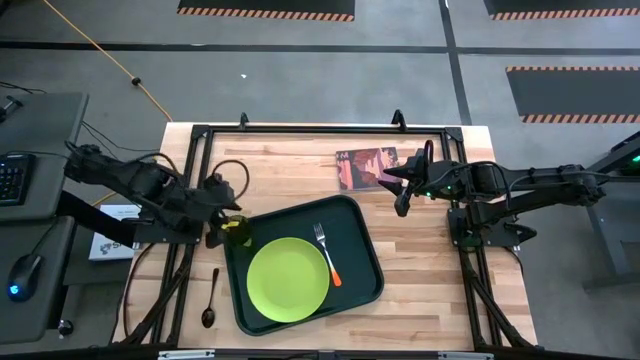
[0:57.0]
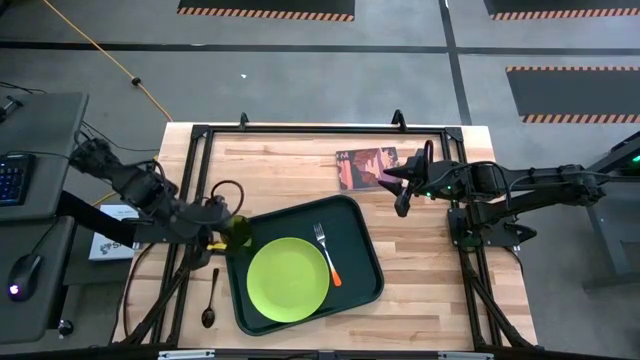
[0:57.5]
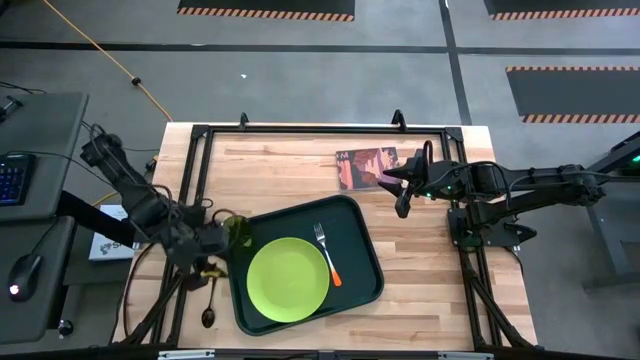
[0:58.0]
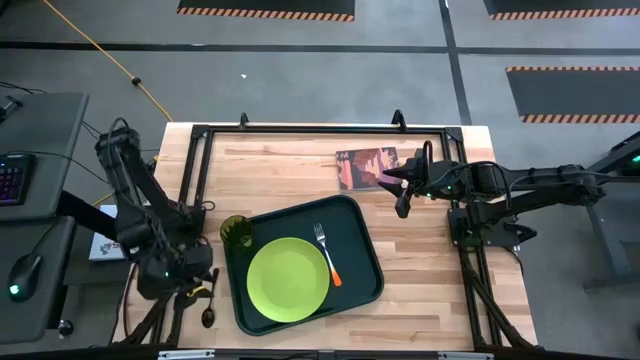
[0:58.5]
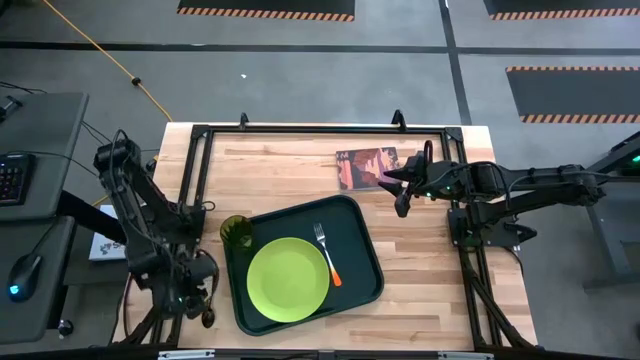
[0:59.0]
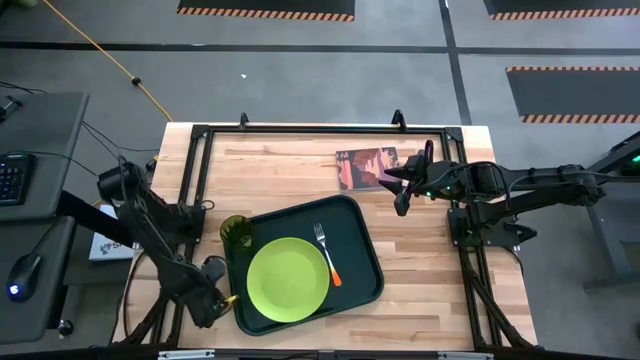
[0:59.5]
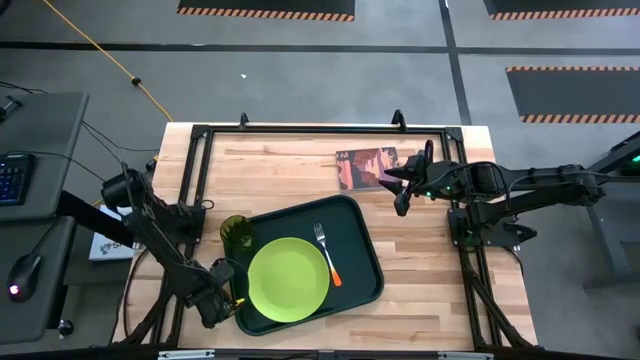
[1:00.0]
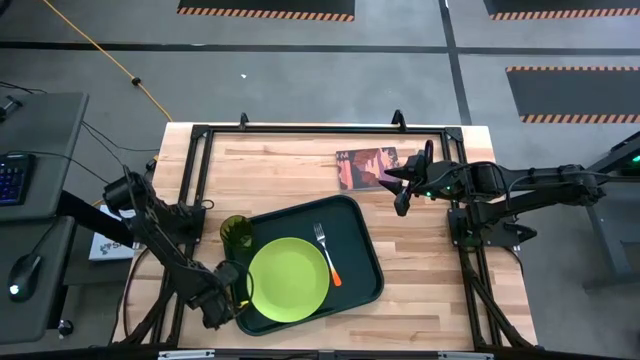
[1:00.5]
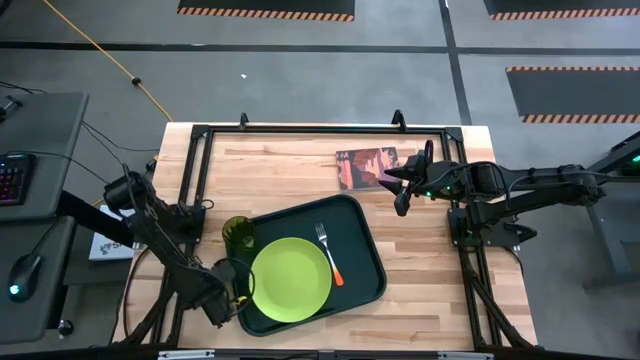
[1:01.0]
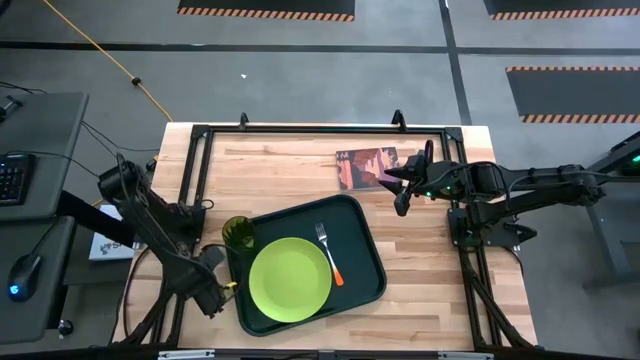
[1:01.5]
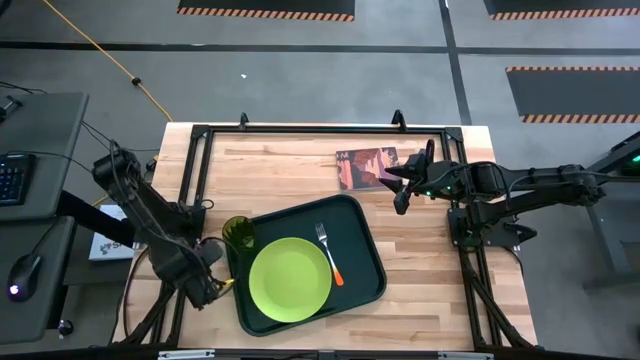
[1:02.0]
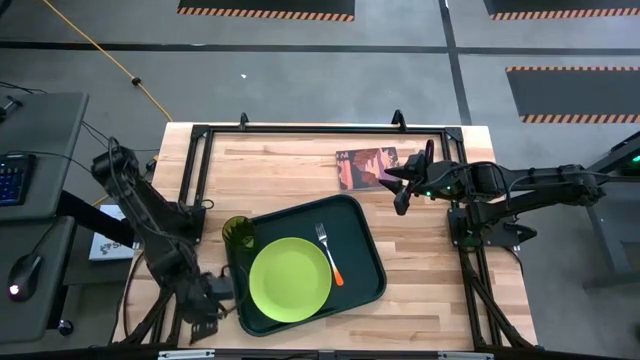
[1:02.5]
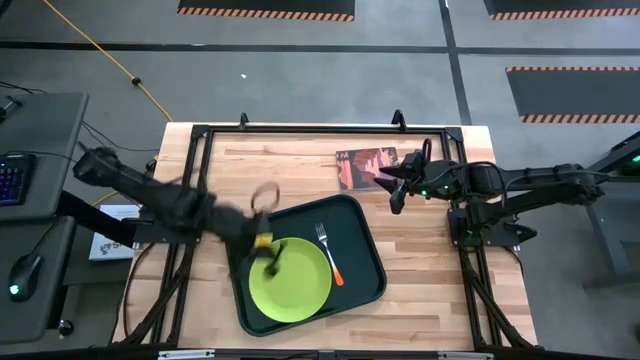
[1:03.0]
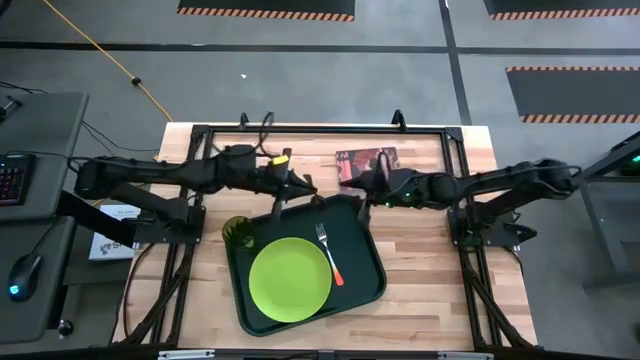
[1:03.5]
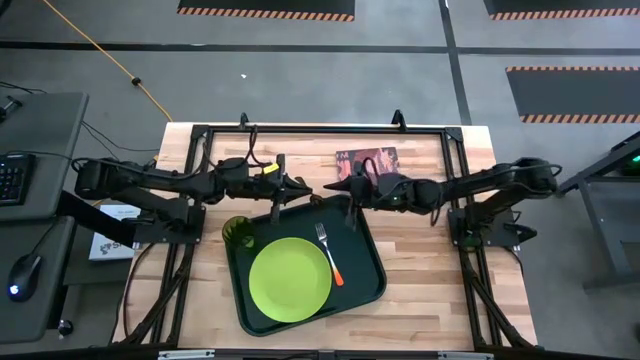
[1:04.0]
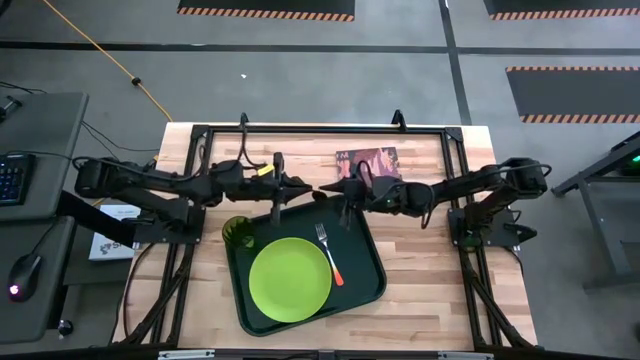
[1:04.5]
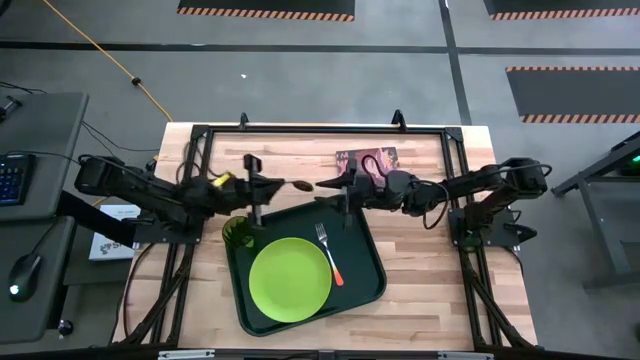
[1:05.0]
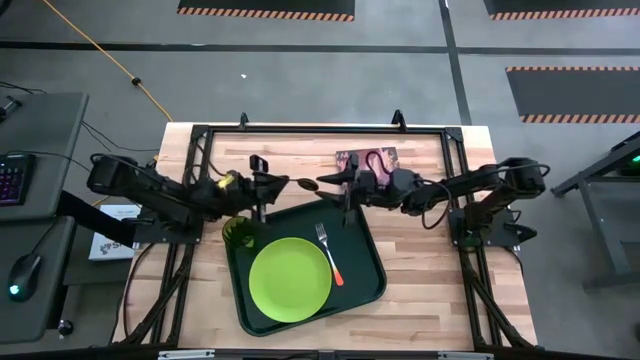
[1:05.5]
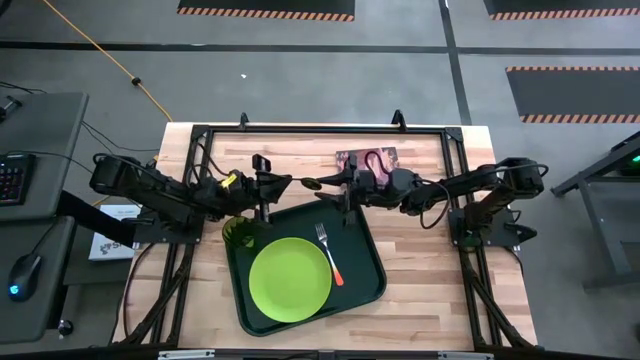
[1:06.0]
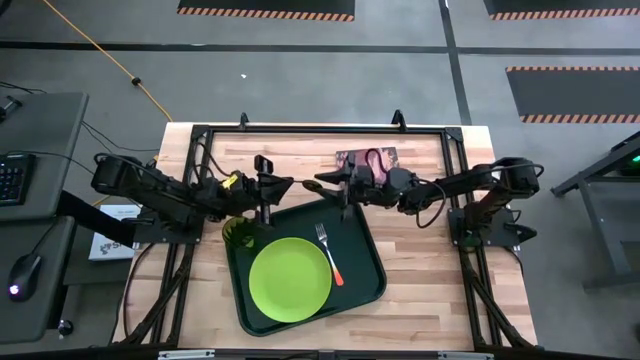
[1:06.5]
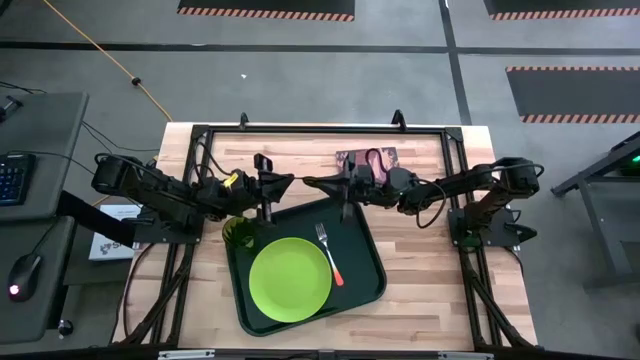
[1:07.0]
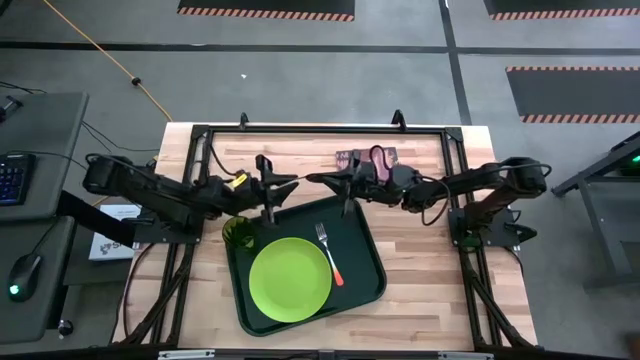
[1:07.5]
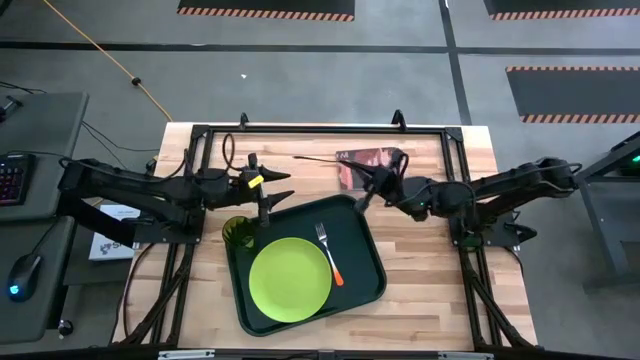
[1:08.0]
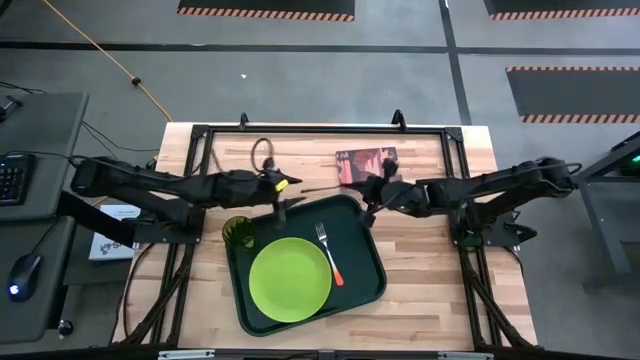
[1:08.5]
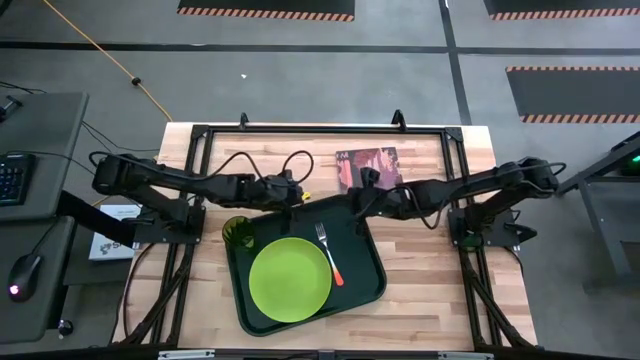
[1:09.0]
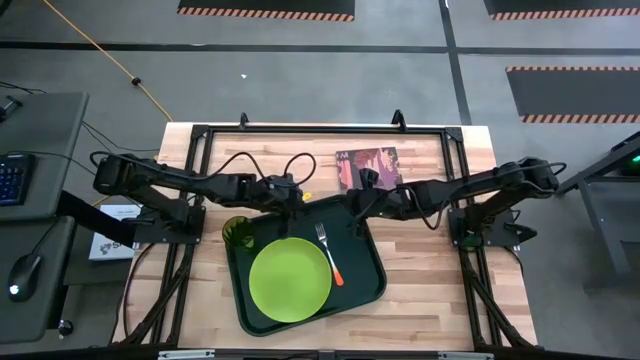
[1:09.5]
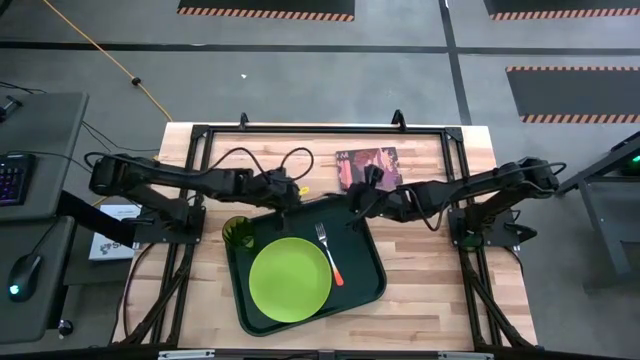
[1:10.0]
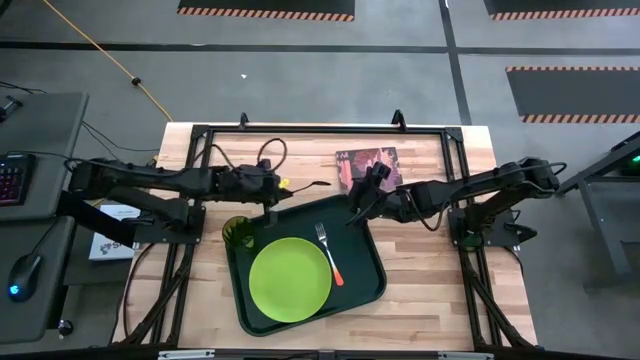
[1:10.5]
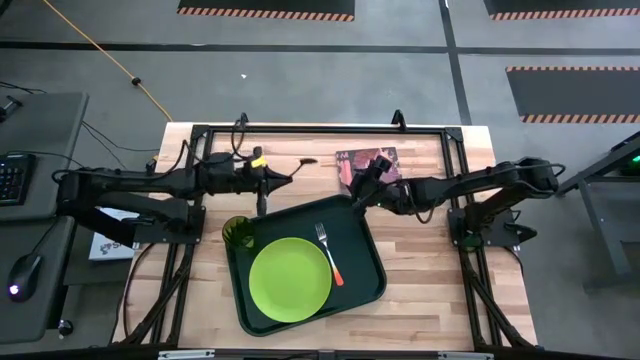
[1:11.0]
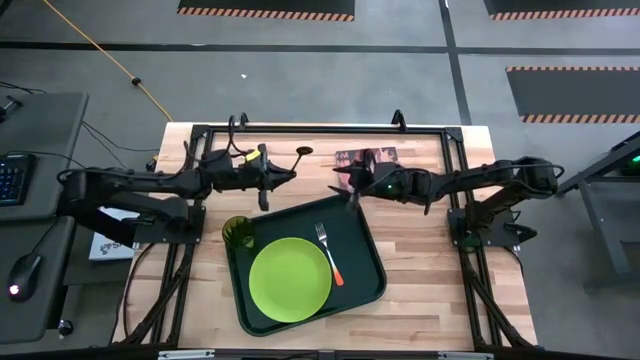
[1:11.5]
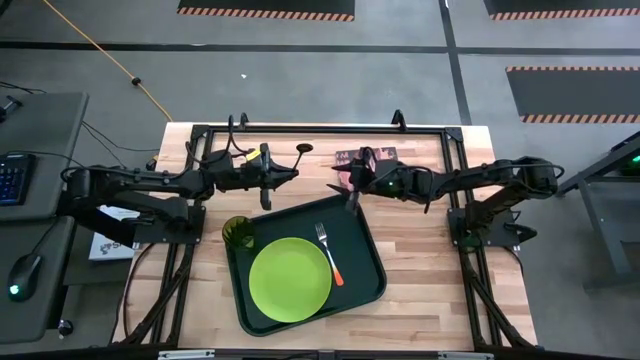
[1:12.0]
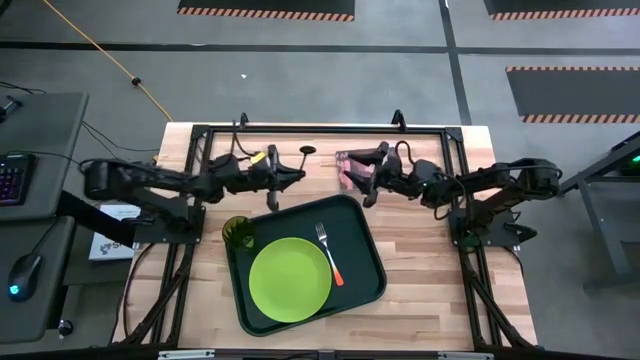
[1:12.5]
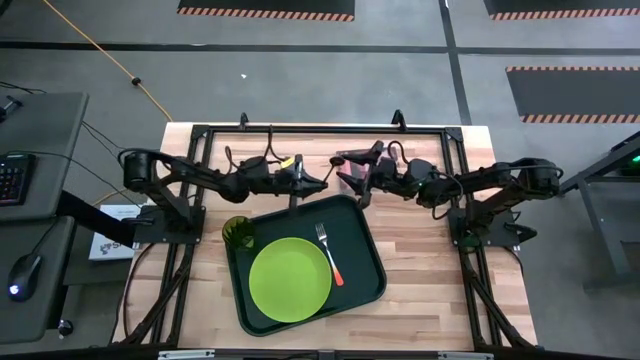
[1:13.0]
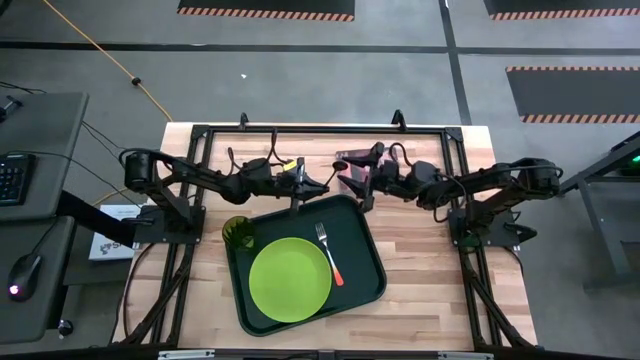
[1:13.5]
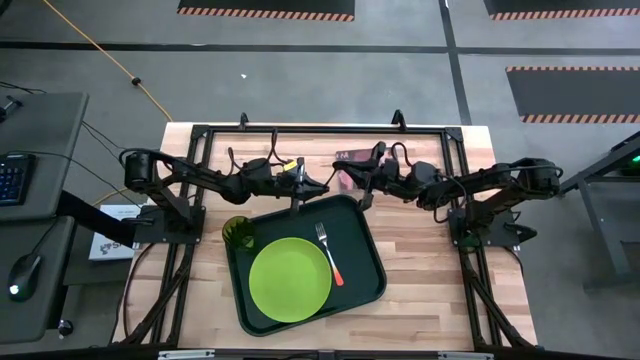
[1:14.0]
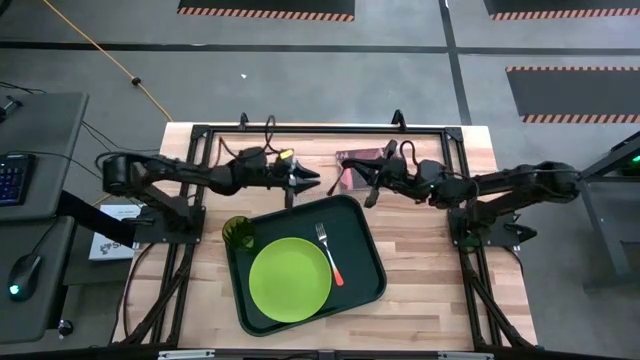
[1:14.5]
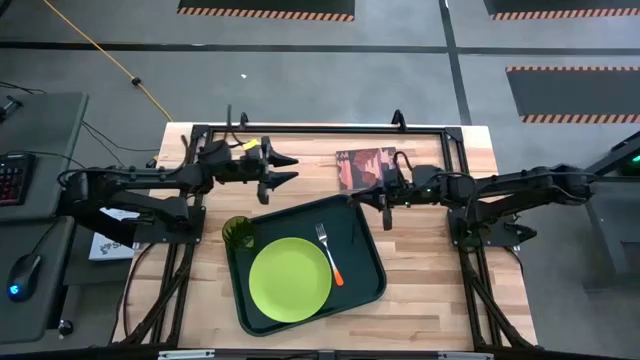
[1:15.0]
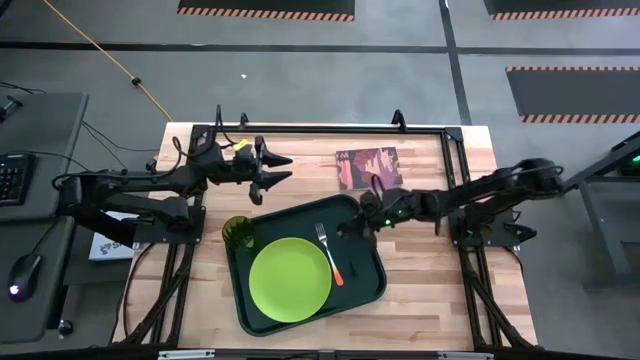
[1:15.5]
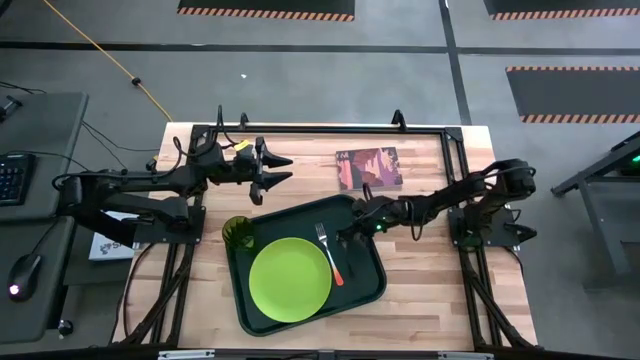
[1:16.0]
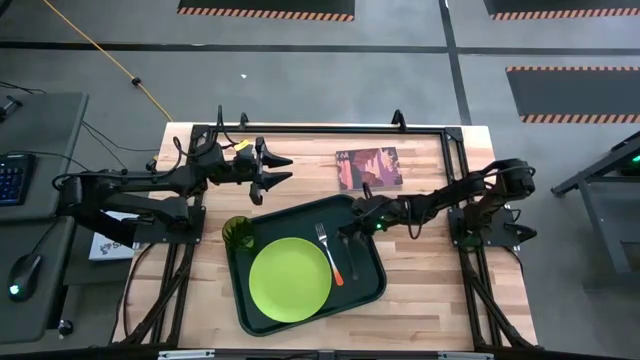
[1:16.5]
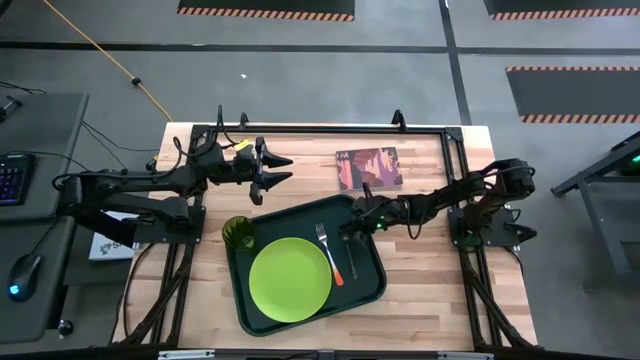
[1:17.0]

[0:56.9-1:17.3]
Task: Pick and place plate/cup/fork/spoon on tray
Put the black spoon on the black tray to the right of the orange fork

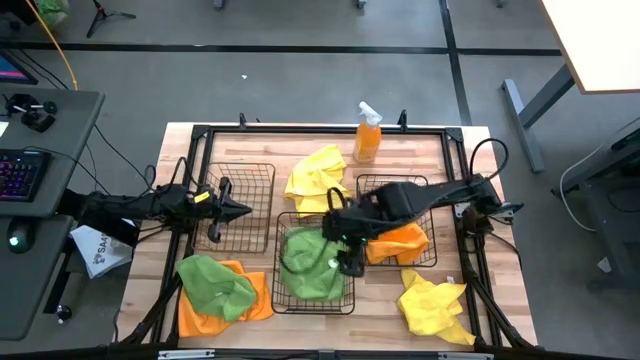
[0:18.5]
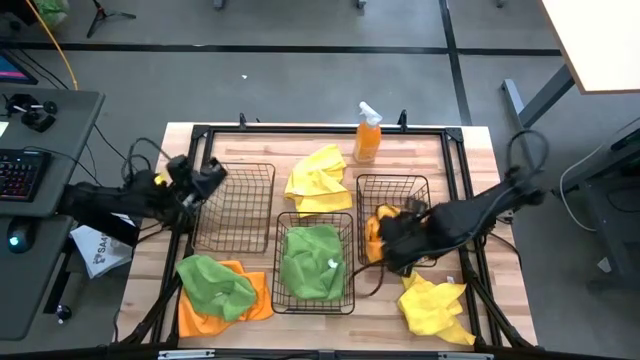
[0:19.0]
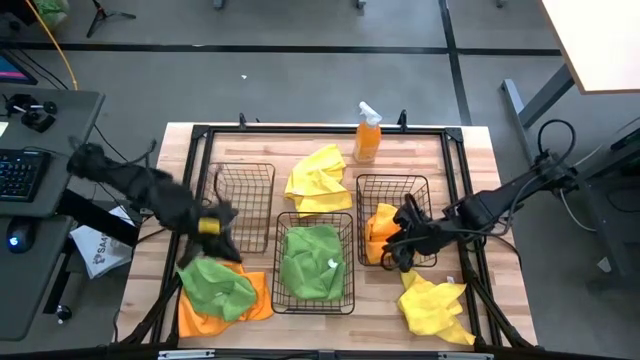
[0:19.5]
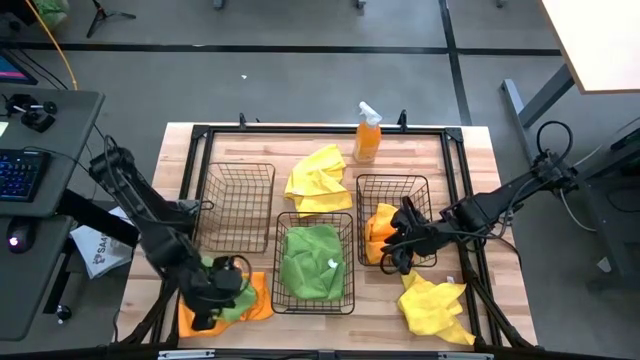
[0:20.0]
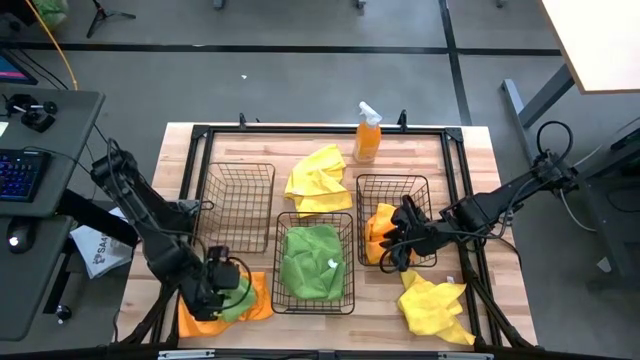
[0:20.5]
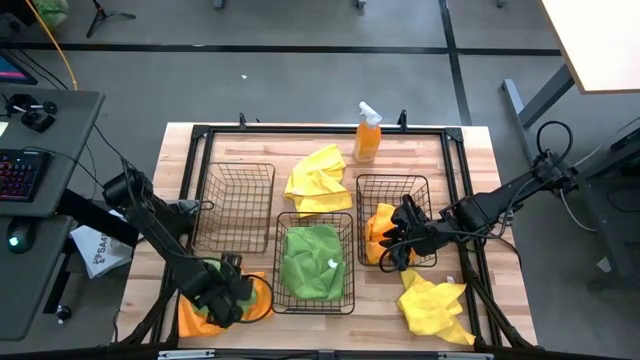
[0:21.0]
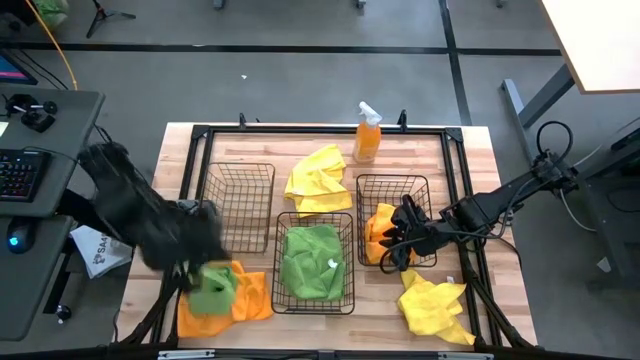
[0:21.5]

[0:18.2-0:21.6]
Task: Sort microfiber towel by color & place in baskets
Put the green towel into the middle wire basket
